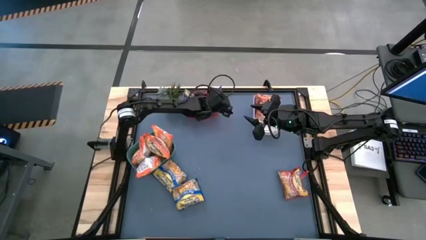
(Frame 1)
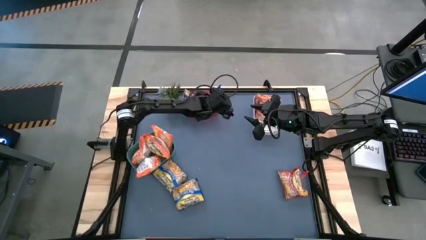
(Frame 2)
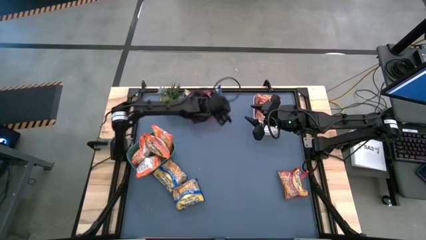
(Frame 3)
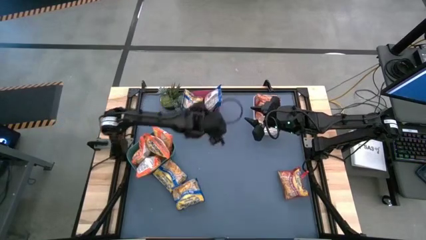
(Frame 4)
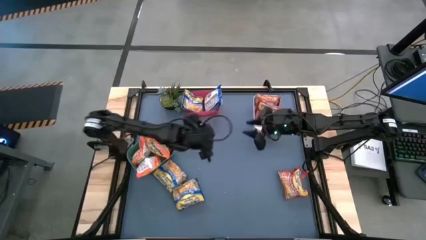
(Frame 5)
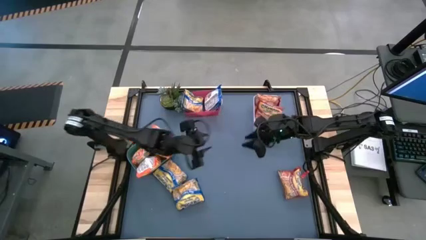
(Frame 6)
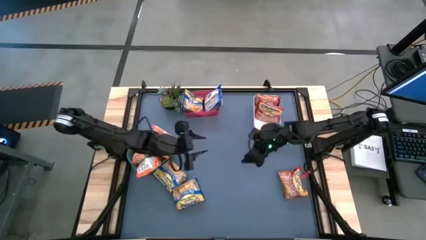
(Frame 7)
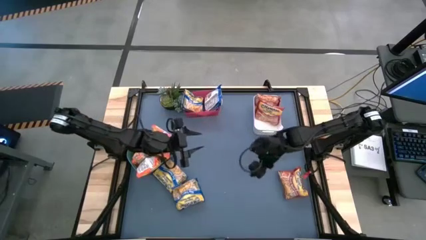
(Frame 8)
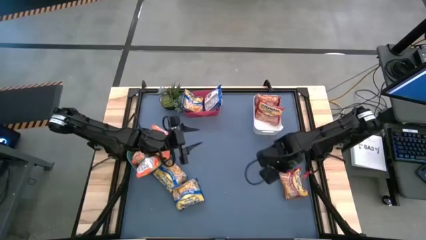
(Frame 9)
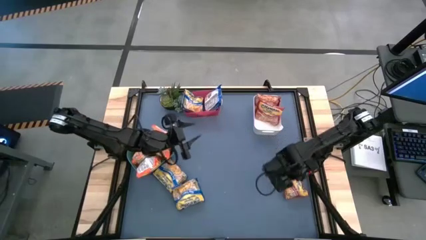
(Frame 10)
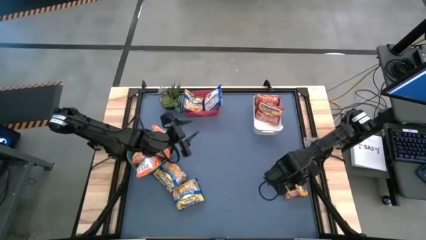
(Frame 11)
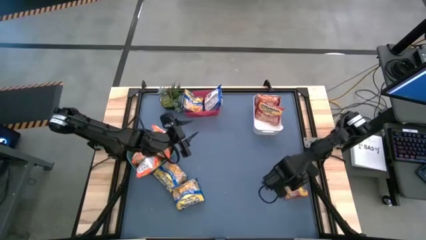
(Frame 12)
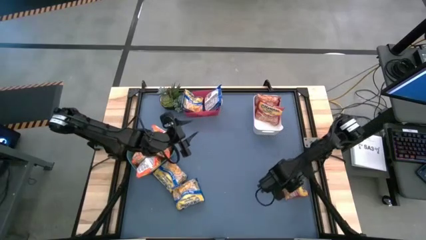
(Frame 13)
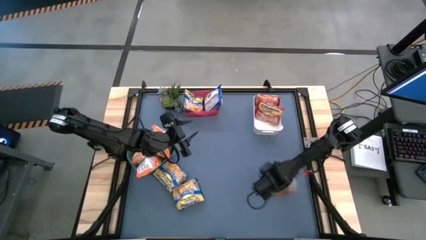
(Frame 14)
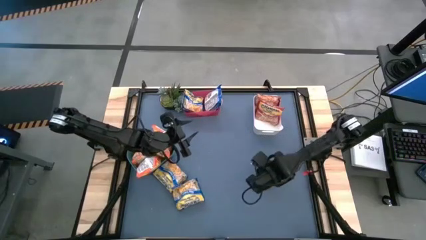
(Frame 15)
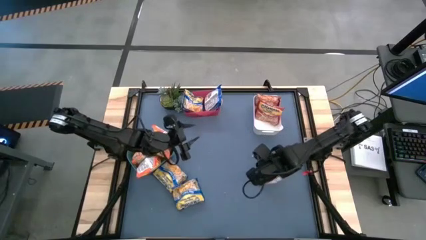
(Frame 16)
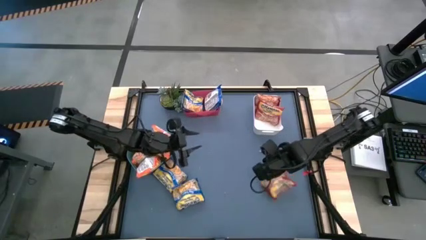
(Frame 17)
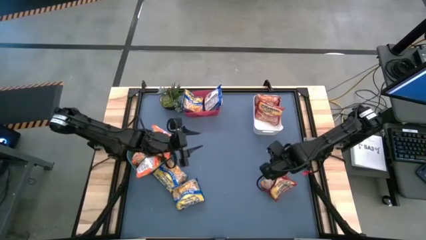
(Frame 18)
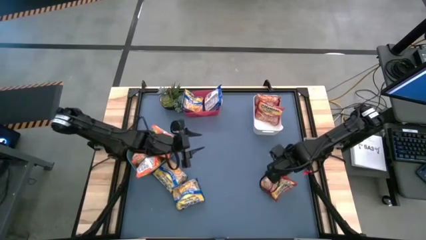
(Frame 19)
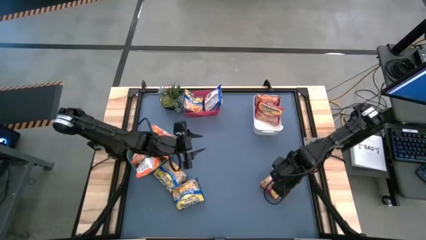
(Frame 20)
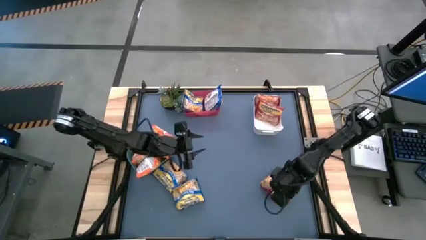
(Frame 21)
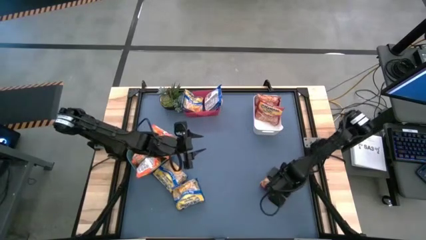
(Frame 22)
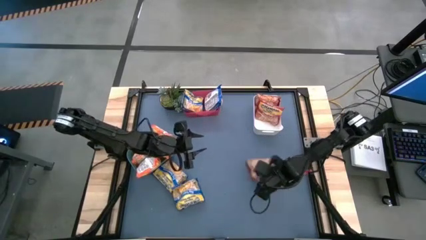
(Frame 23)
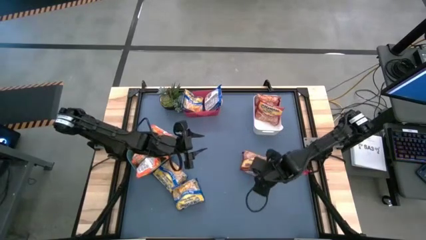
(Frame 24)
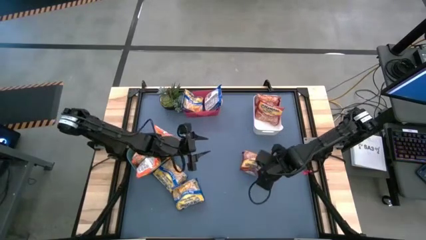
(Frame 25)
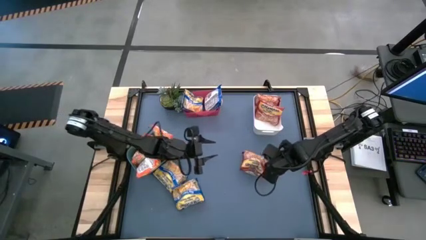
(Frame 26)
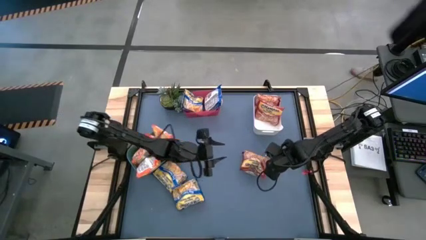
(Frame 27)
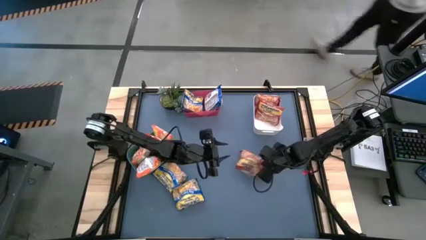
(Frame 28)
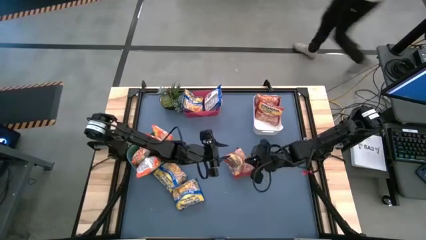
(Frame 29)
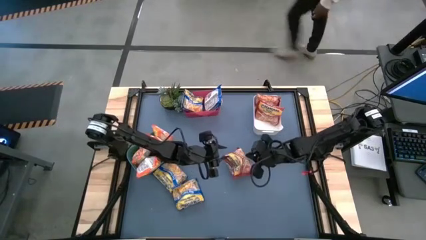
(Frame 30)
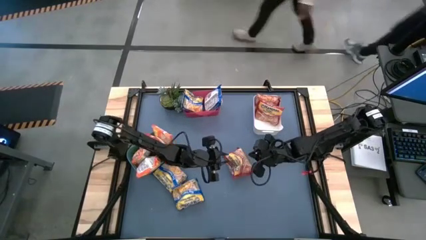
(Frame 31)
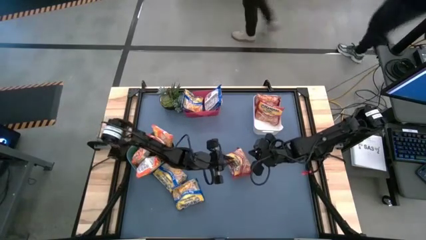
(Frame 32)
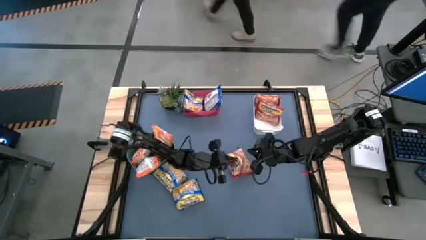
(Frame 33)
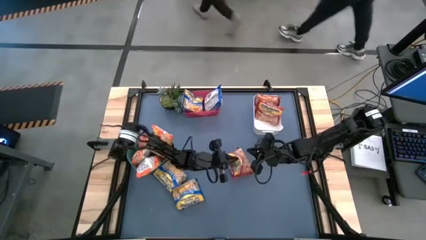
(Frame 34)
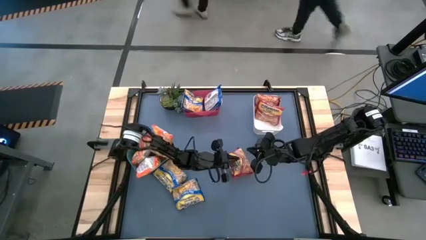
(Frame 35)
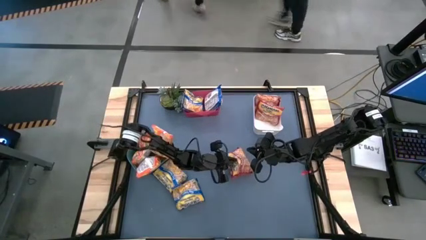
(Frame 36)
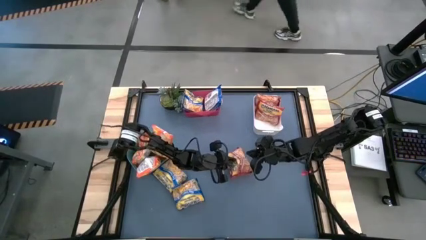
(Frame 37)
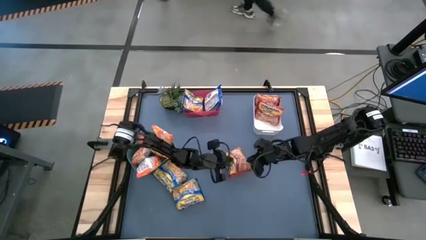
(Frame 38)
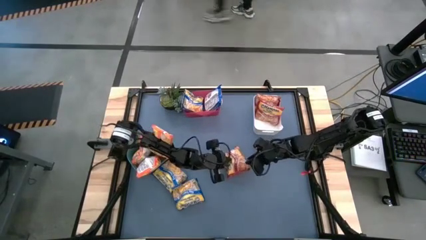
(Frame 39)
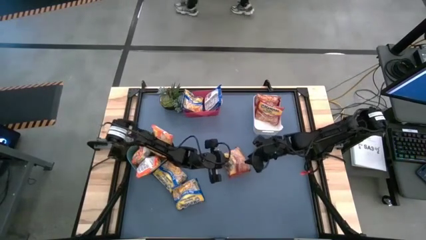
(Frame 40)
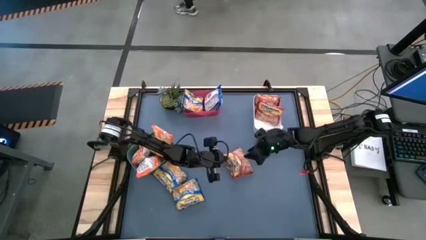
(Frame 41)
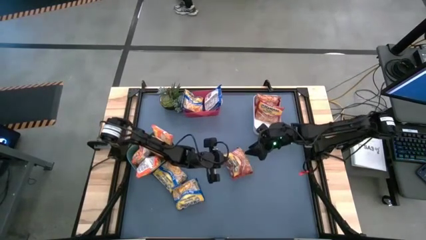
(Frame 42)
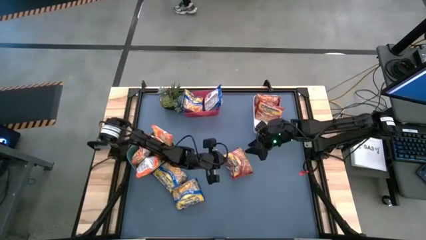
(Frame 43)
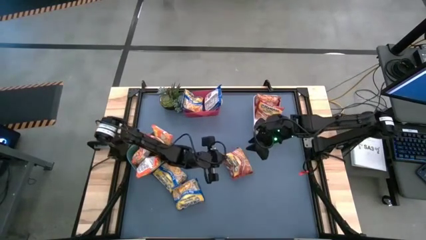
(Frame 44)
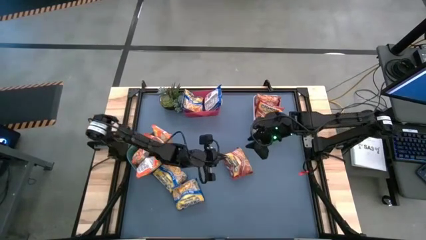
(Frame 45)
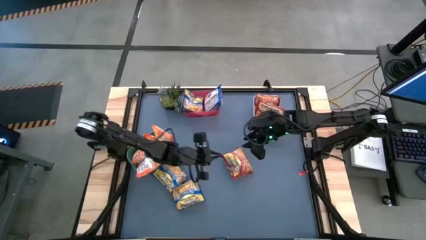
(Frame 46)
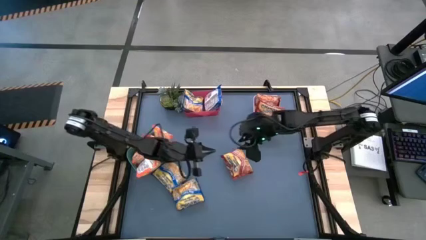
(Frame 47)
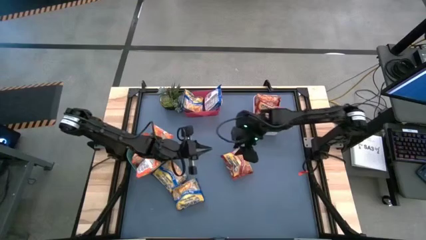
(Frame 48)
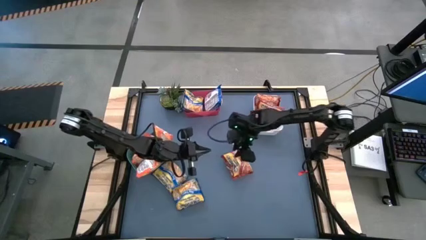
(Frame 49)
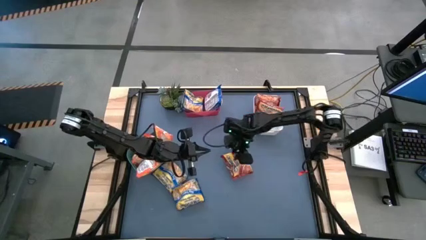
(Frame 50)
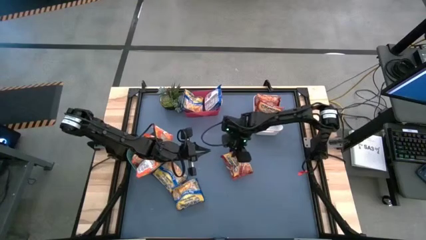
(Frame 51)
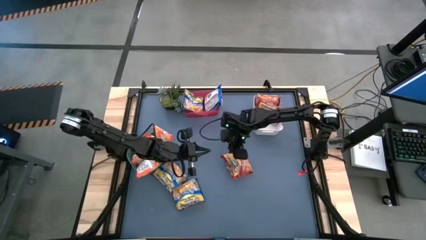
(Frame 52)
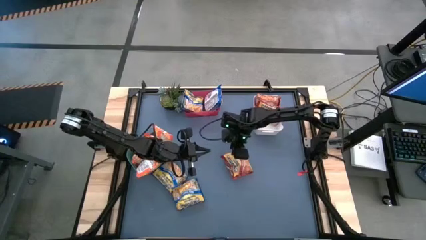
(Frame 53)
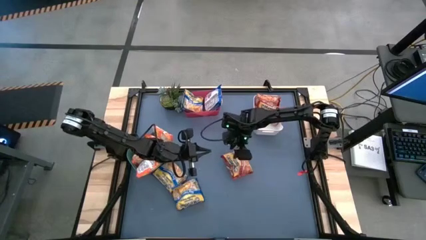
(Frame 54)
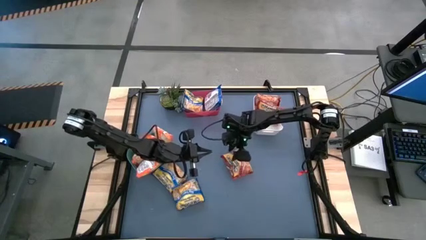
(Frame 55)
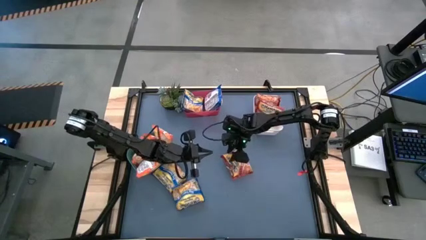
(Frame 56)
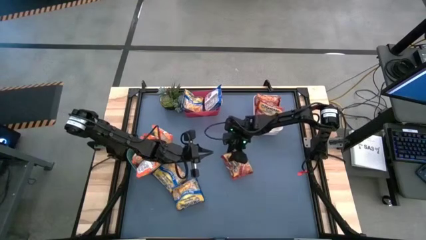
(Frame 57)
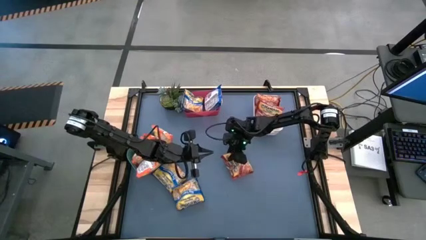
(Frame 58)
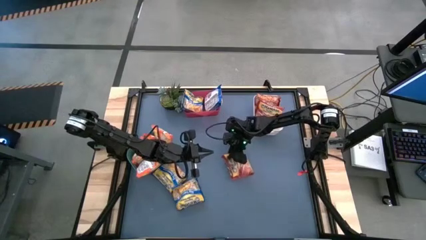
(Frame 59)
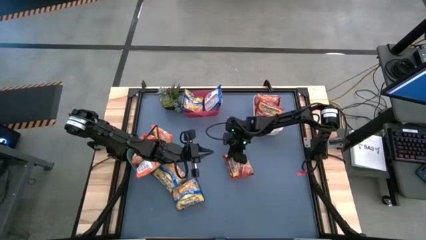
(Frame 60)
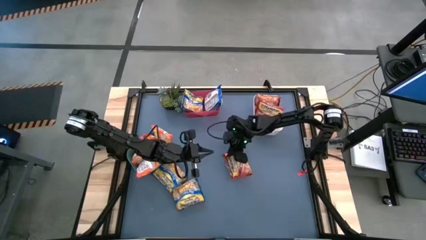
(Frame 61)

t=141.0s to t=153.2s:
Task: Sort Maruchan noodles
Put the red noodle pack into the white bin

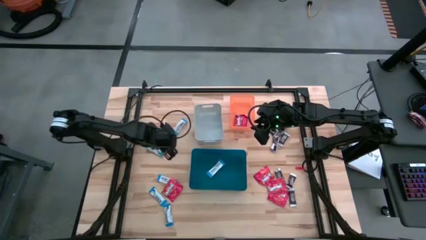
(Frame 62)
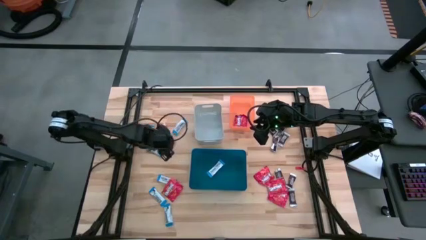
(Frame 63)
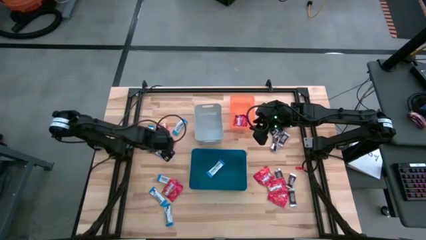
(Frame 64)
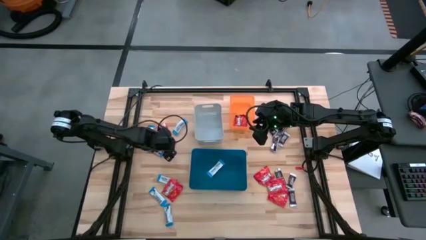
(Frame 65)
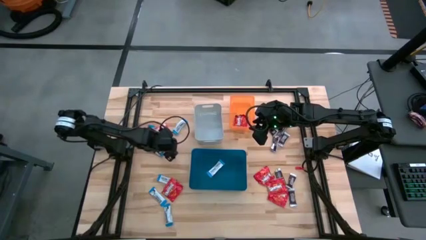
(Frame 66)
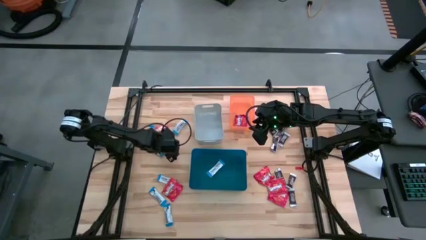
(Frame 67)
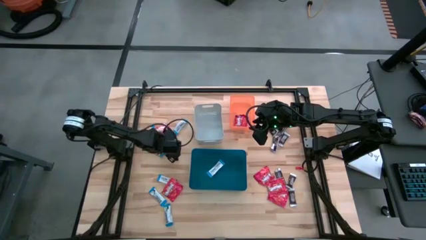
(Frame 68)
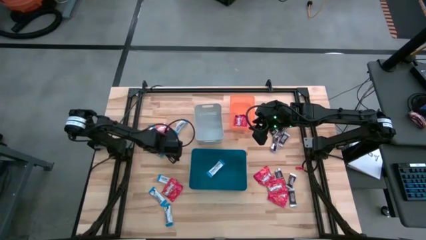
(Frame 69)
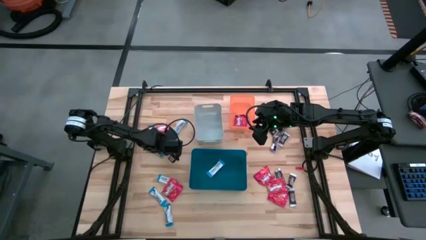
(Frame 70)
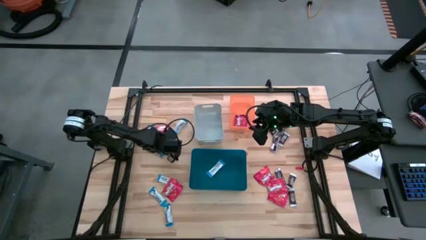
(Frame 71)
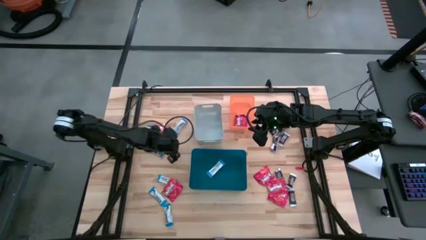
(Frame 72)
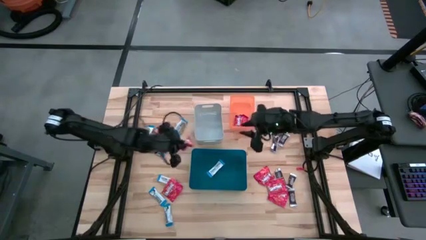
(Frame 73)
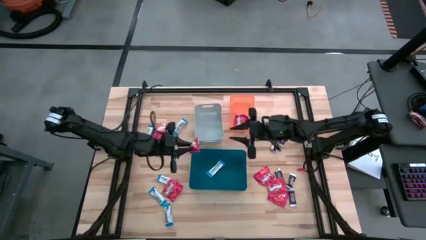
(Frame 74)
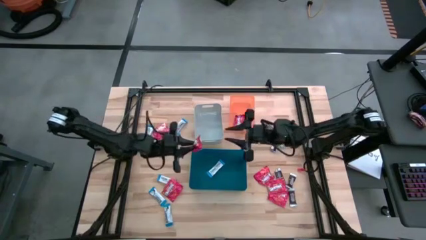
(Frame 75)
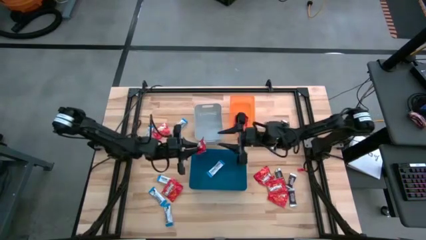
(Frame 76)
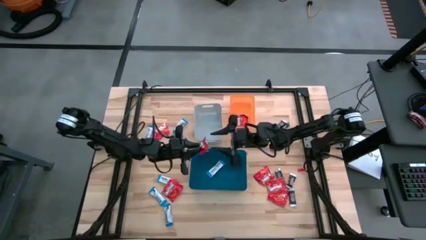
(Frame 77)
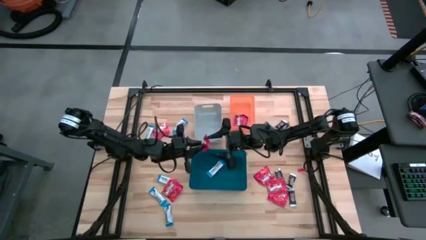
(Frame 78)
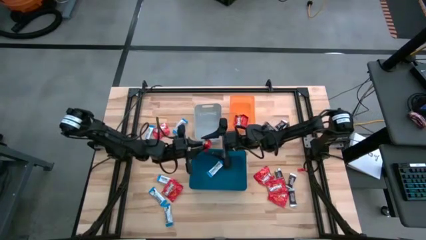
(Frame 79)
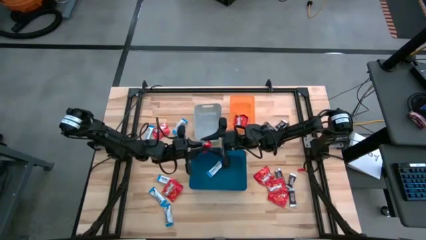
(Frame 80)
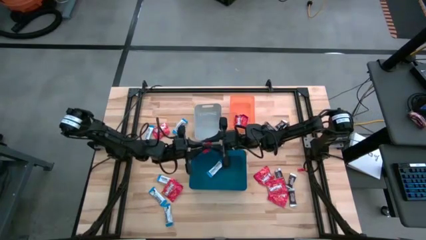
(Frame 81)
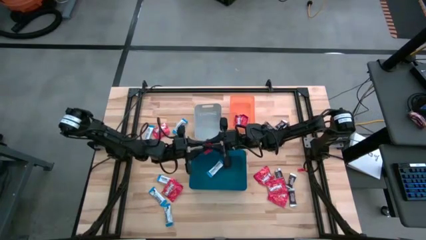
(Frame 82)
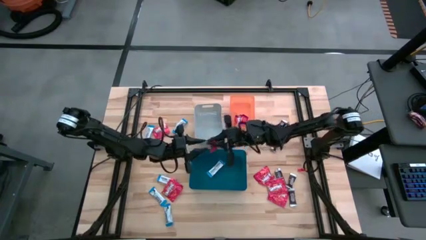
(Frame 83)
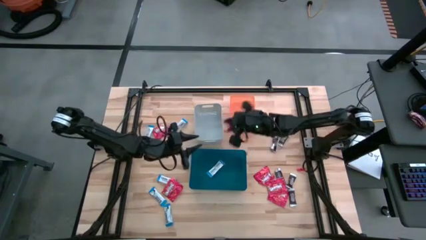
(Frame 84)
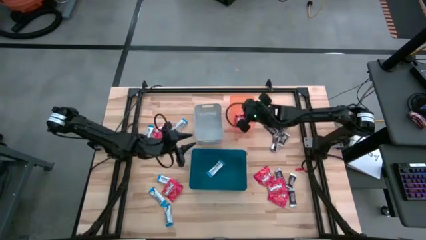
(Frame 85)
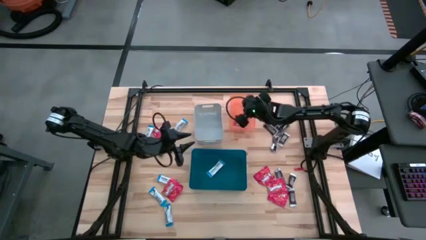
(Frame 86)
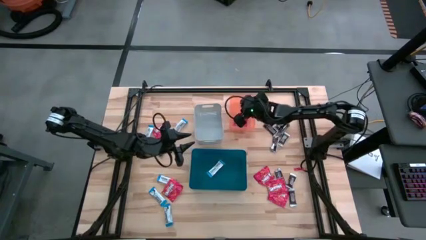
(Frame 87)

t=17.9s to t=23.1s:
Task: Sort candy
Put the red chocolate into the orange bin
